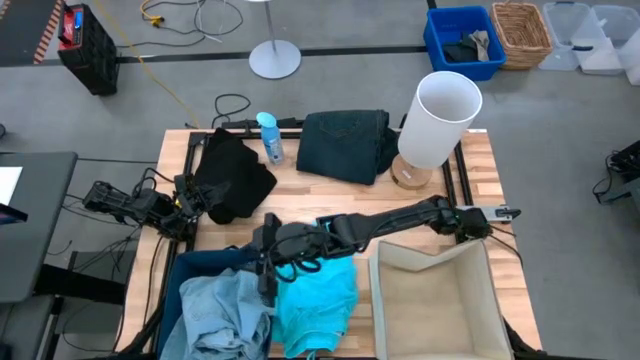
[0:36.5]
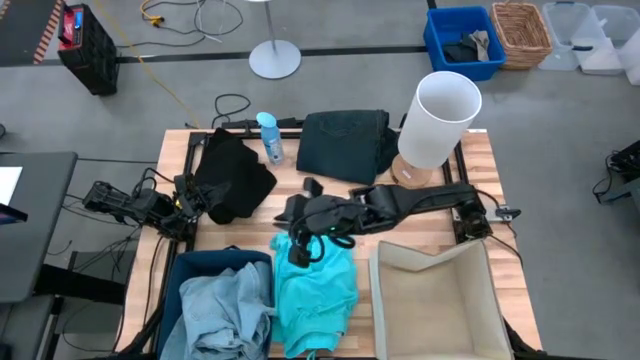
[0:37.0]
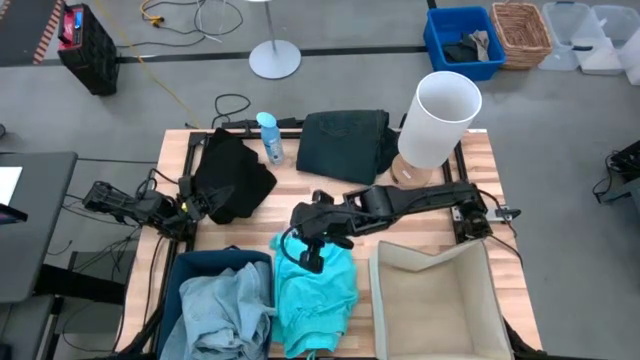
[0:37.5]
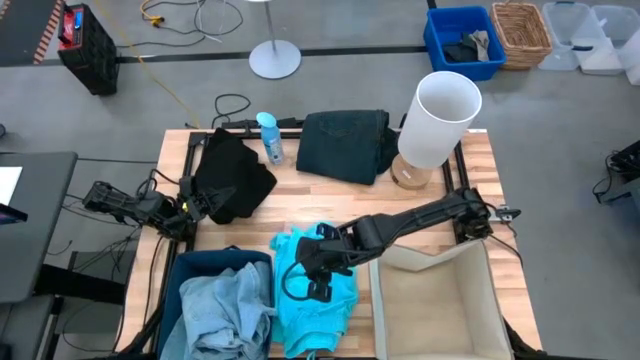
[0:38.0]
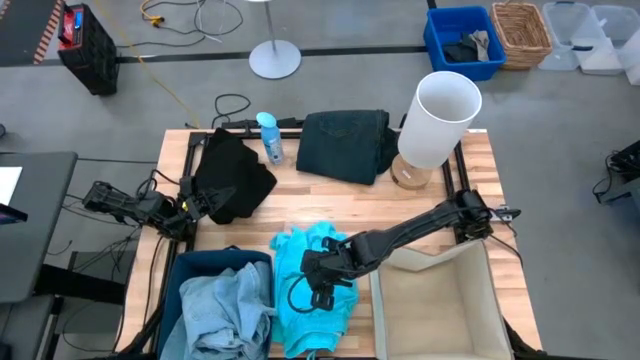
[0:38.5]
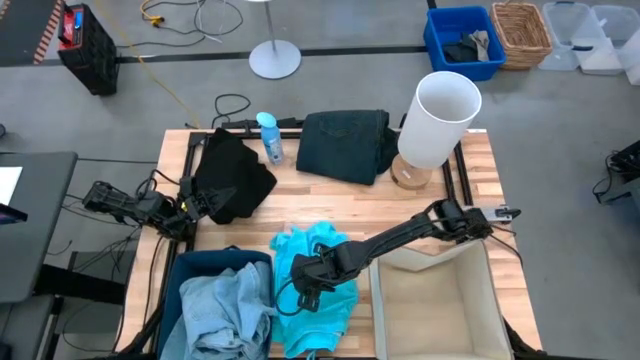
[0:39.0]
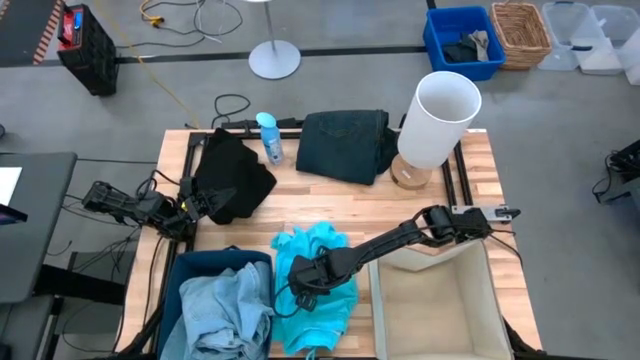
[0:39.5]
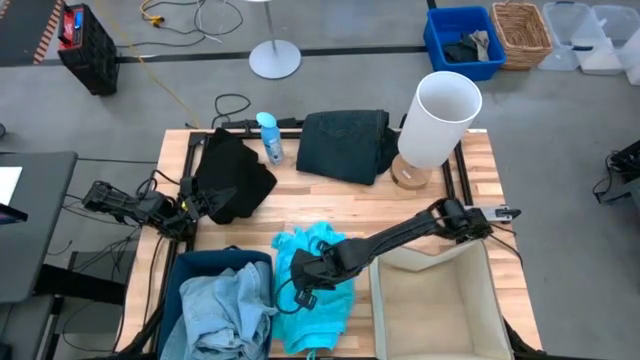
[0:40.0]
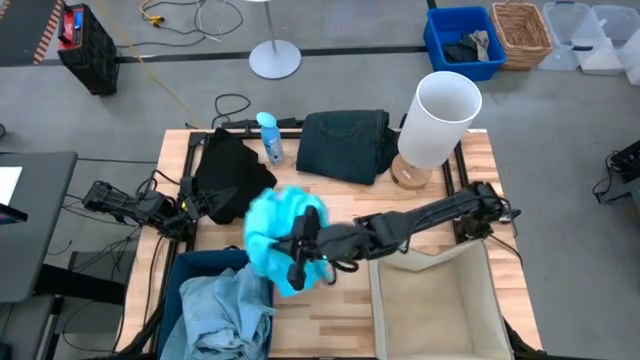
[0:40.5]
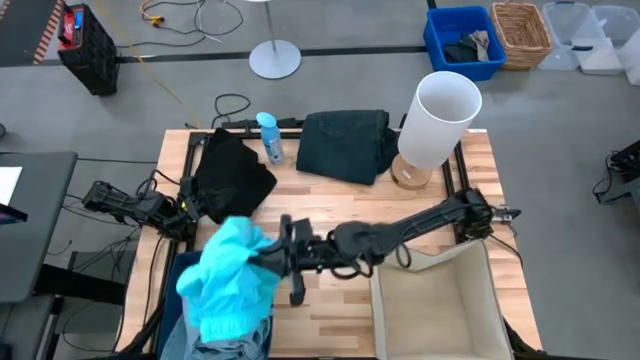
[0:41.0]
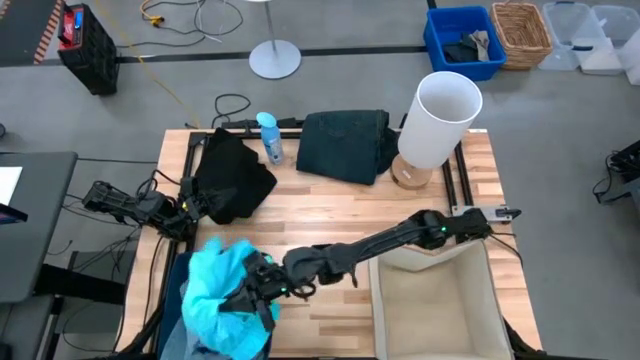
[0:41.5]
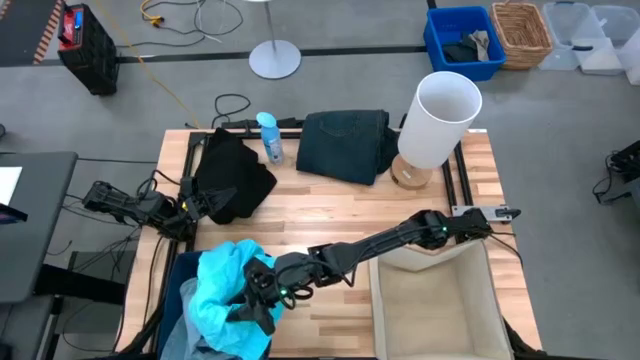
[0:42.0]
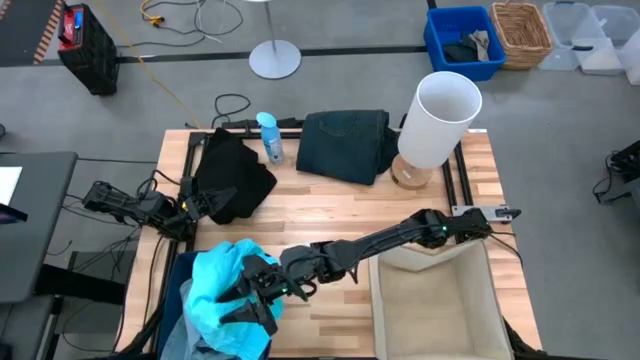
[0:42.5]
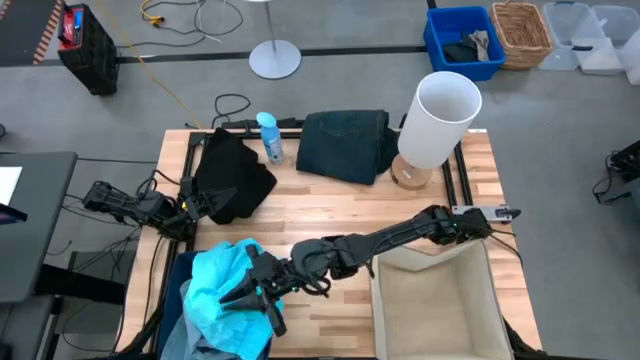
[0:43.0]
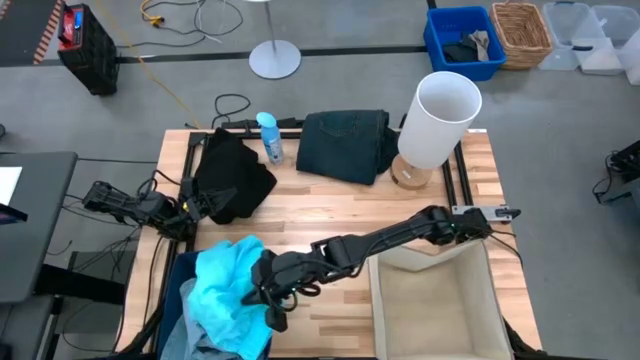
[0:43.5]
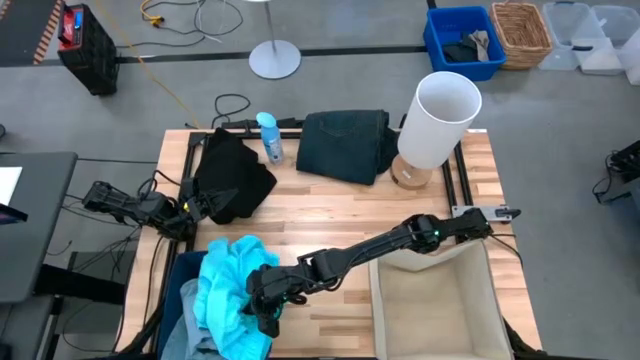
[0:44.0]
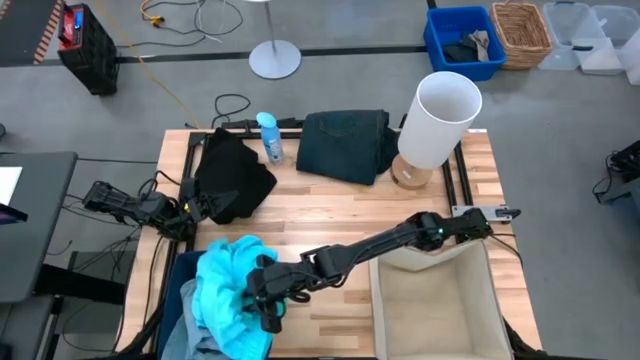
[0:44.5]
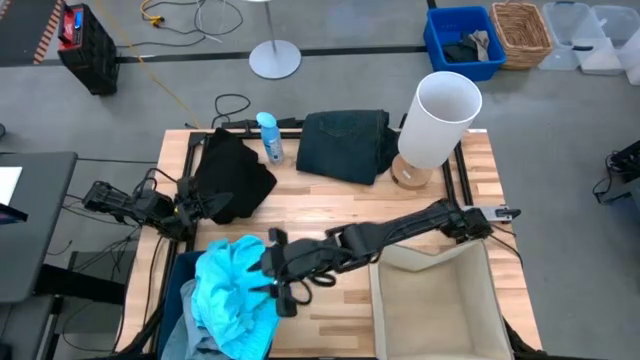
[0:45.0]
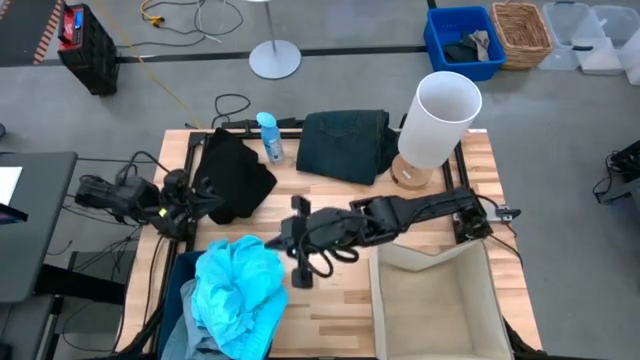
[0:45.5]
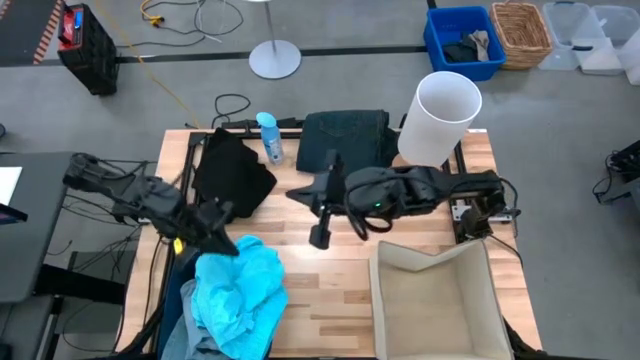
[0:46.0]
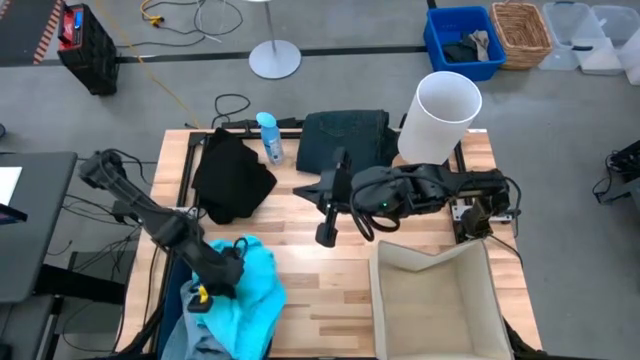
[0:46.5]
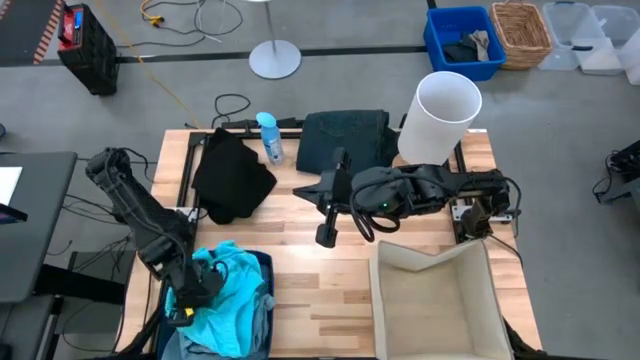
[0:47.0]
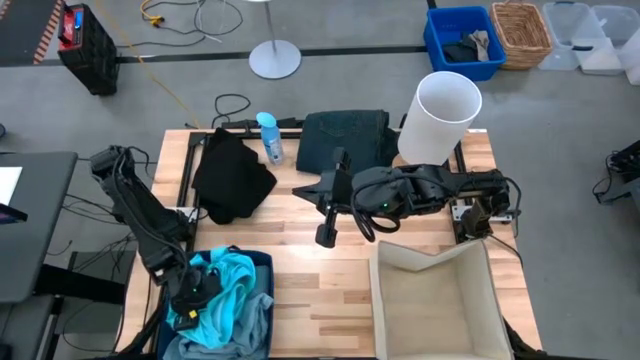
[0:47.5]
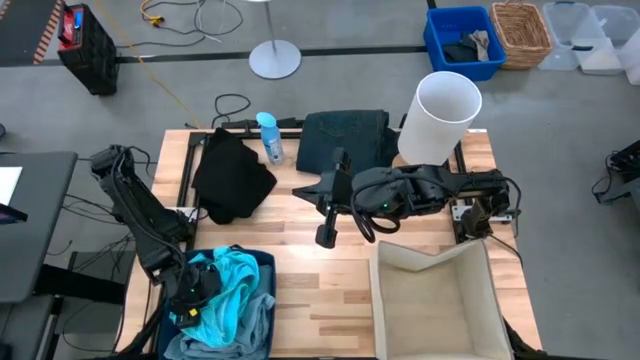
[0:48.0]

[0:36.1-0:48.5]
Task: Sort clothes
Put the blue short pants into the blue laundry organizer

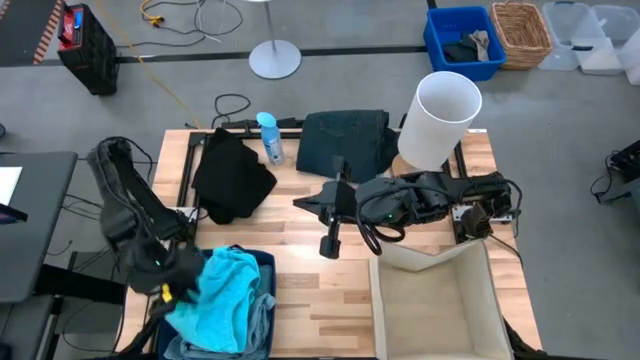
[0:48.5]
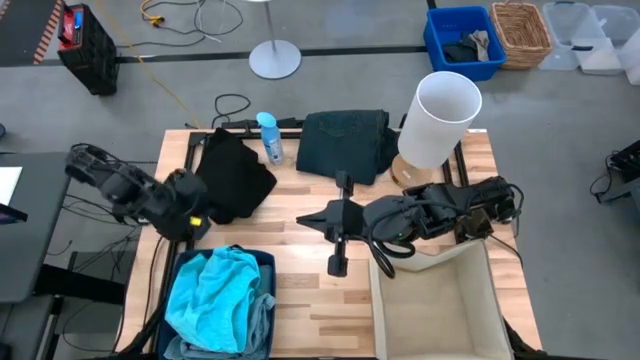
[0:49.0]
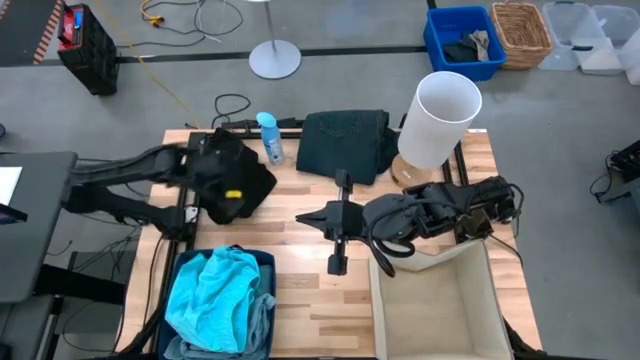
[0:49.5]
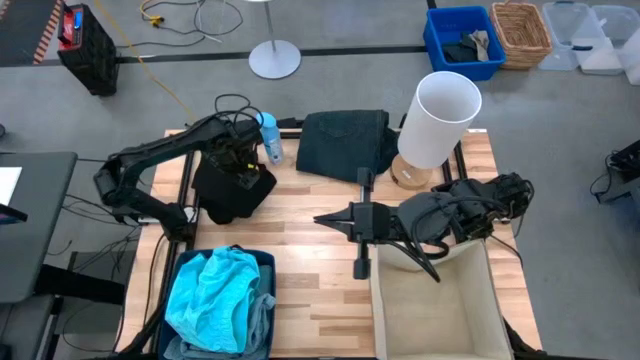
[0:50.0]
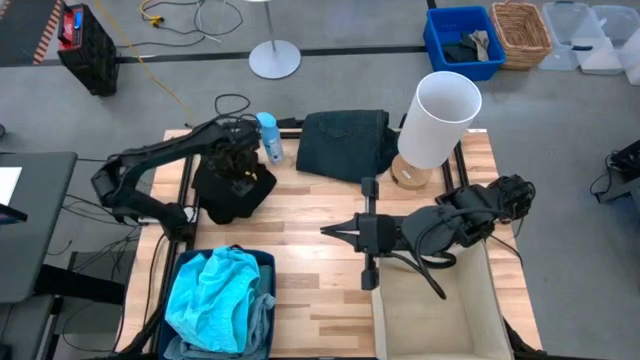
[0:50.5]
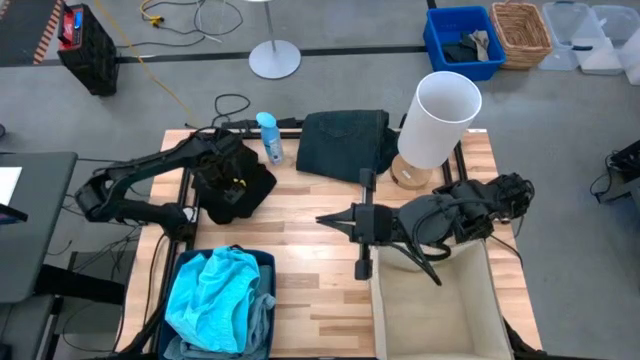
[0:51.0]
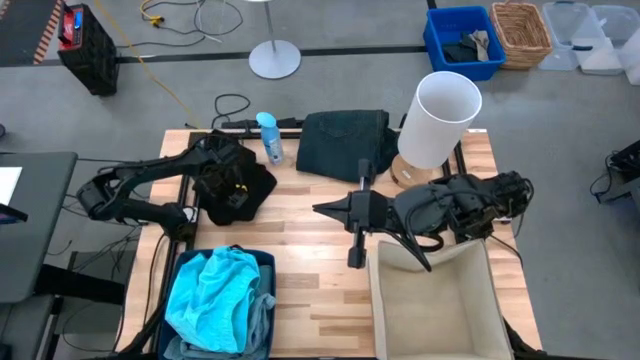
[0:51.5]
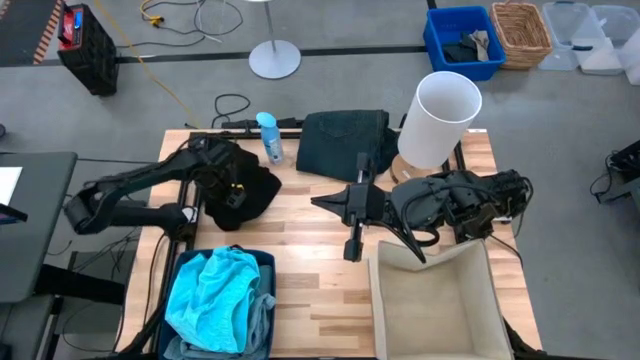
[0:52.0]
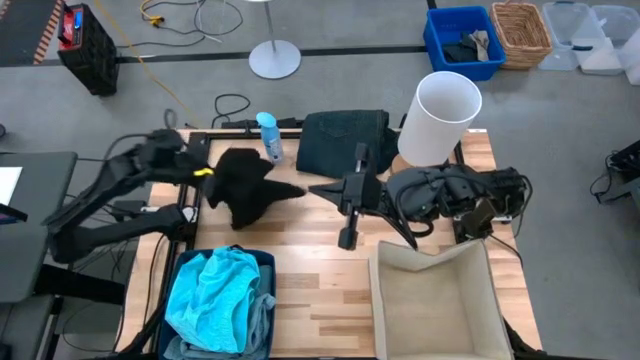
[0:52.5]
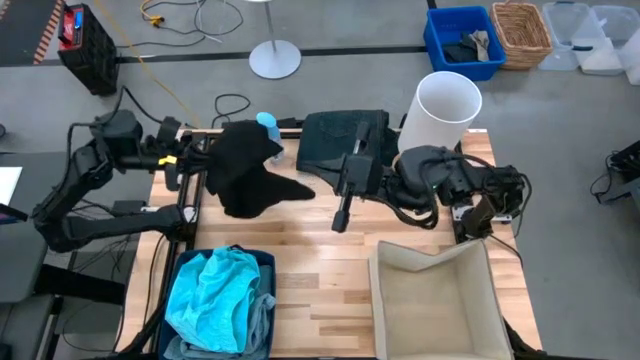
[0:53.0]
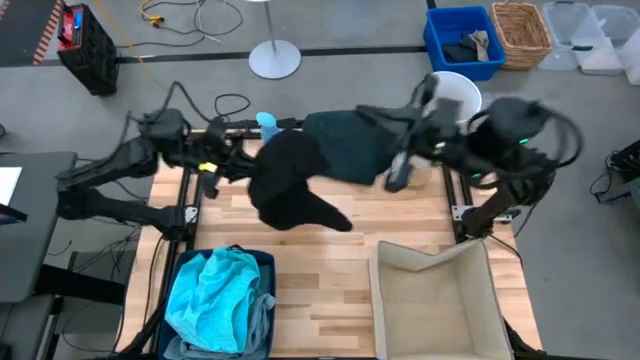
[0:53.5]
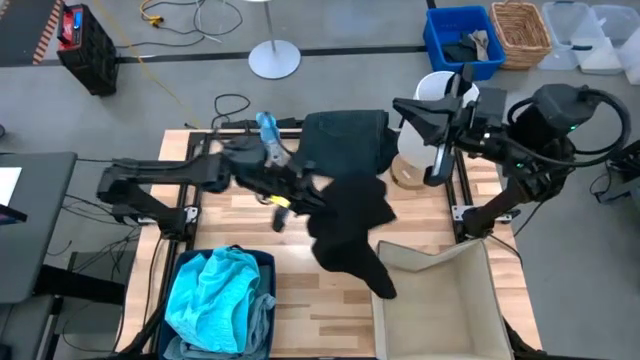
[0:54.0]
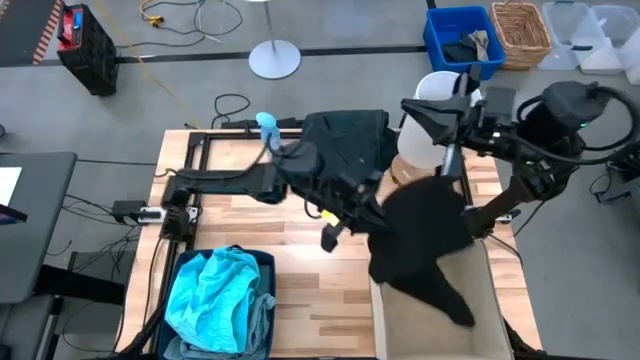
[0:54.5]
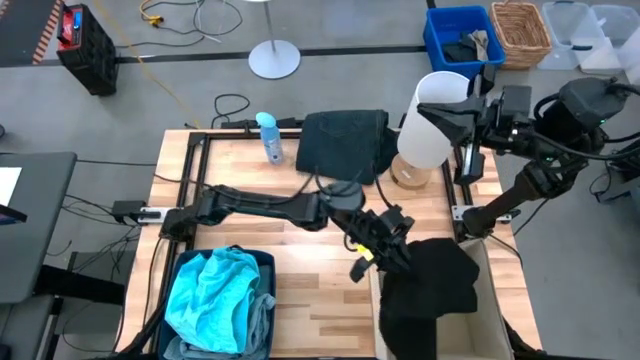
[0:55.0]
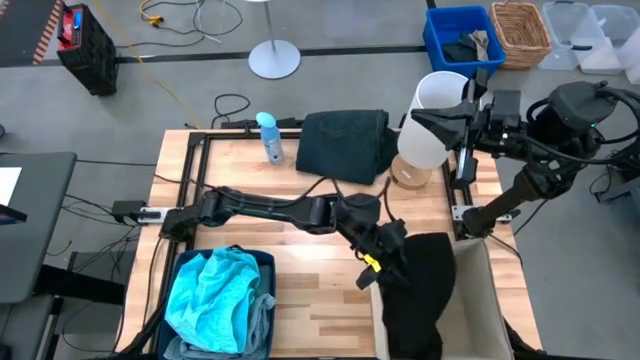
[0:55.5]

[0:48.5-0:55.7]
Put the black cloth into the blue laundry organizer
